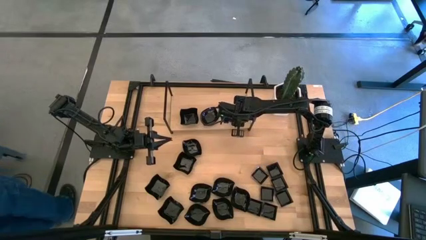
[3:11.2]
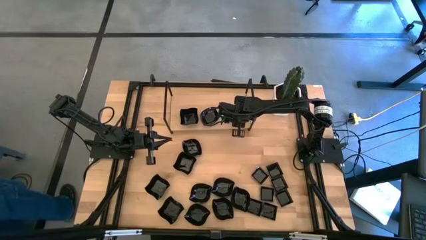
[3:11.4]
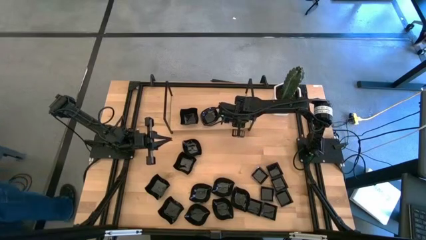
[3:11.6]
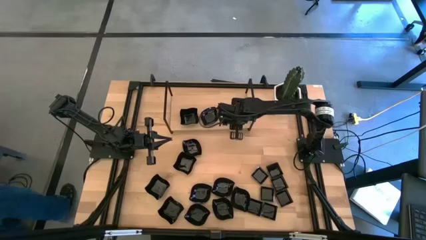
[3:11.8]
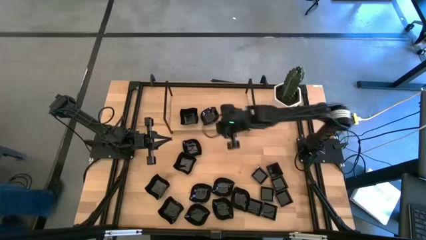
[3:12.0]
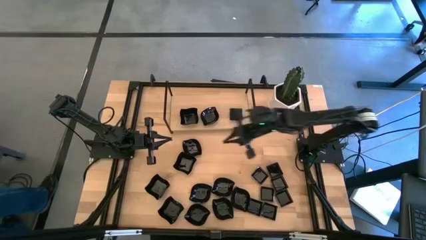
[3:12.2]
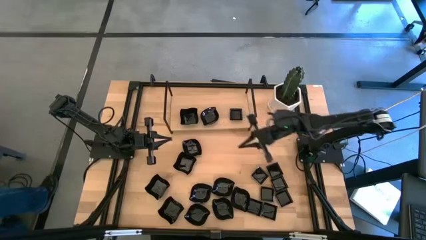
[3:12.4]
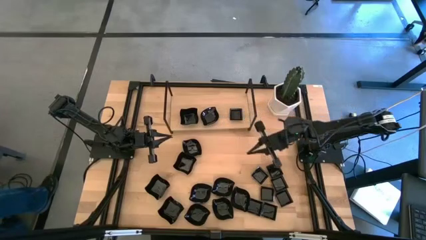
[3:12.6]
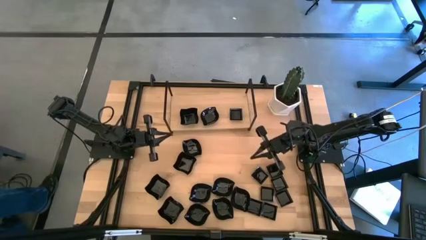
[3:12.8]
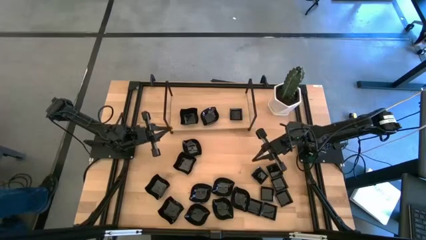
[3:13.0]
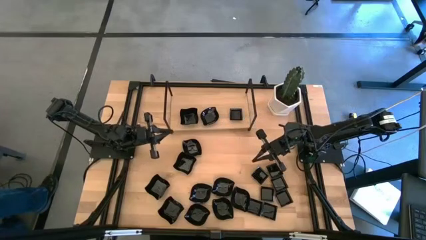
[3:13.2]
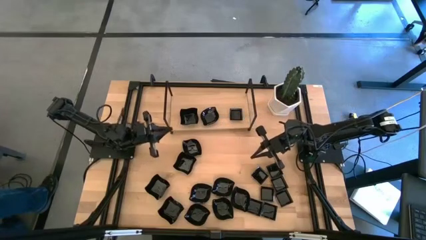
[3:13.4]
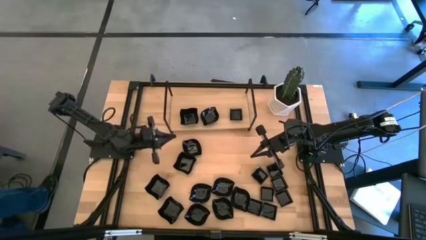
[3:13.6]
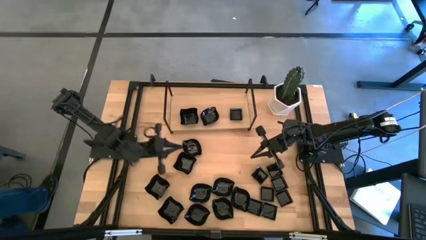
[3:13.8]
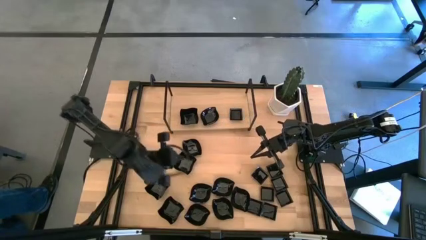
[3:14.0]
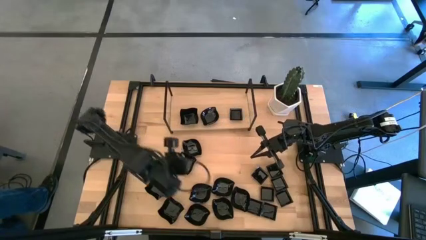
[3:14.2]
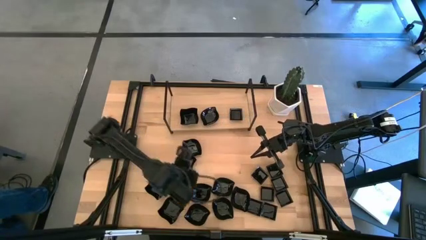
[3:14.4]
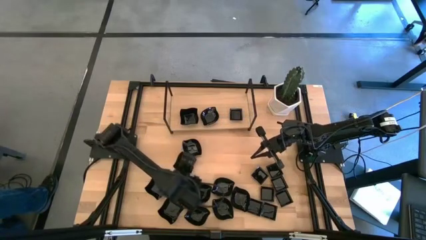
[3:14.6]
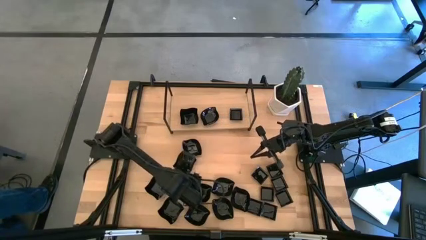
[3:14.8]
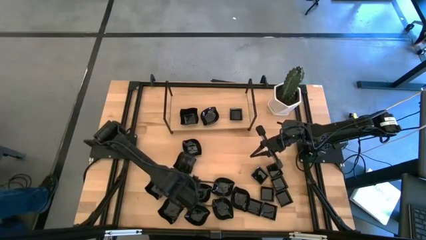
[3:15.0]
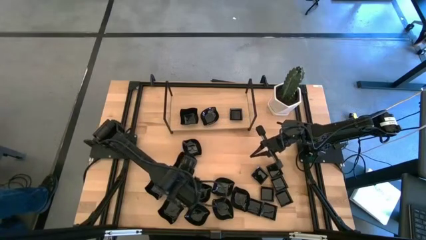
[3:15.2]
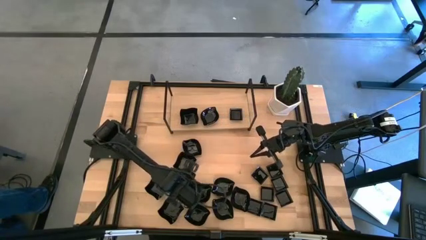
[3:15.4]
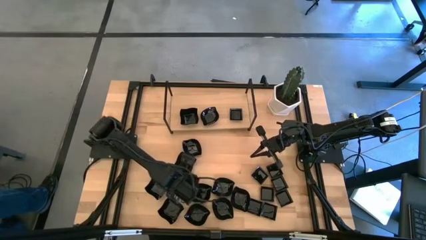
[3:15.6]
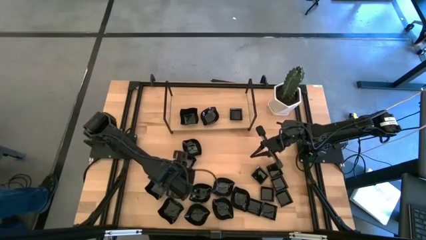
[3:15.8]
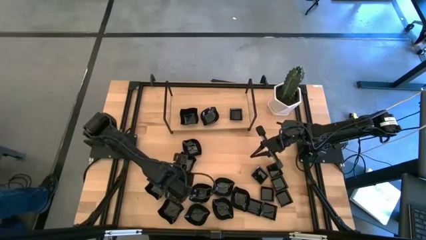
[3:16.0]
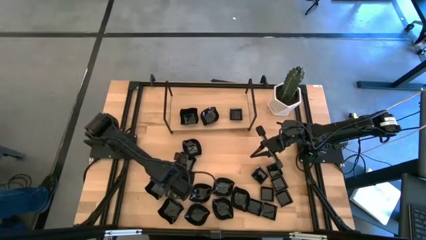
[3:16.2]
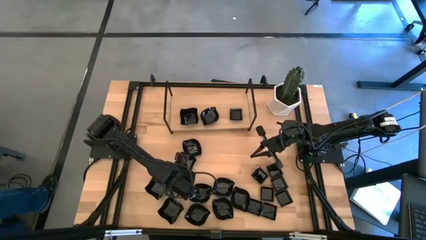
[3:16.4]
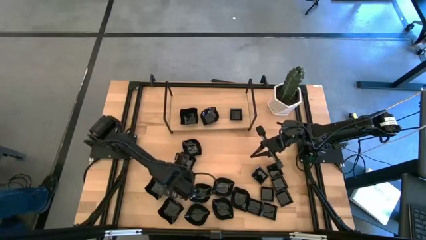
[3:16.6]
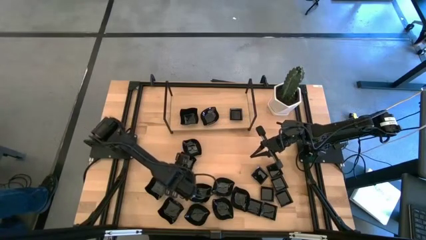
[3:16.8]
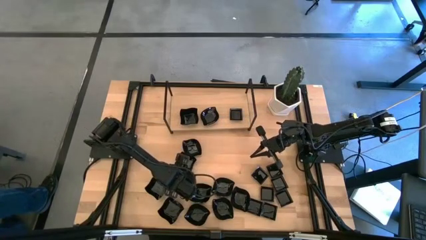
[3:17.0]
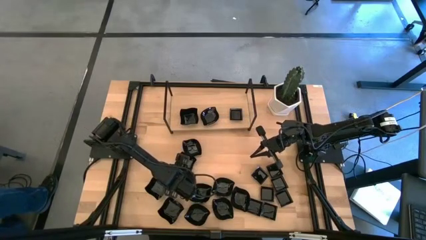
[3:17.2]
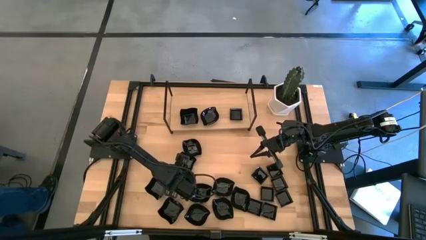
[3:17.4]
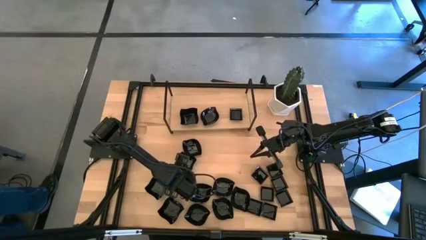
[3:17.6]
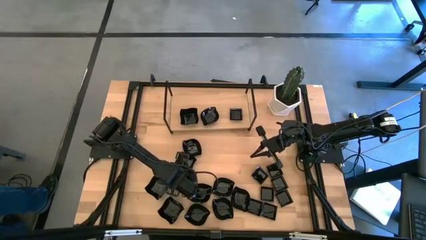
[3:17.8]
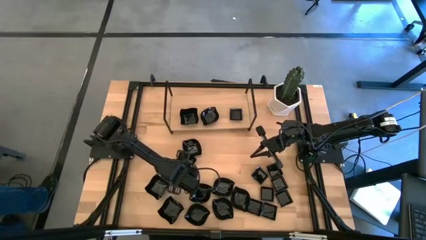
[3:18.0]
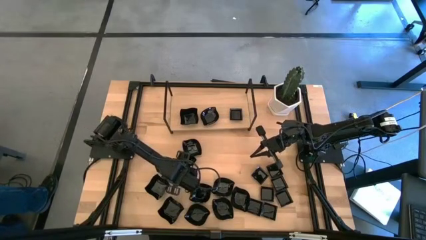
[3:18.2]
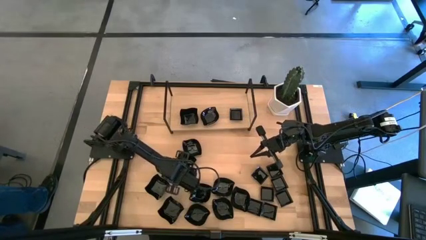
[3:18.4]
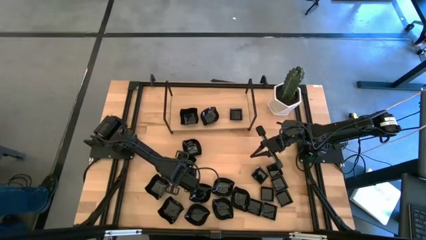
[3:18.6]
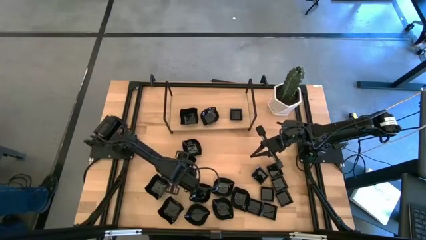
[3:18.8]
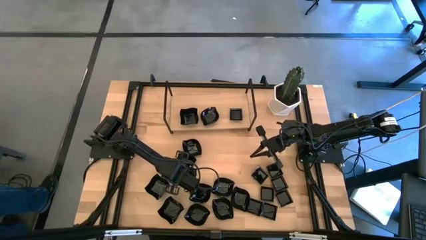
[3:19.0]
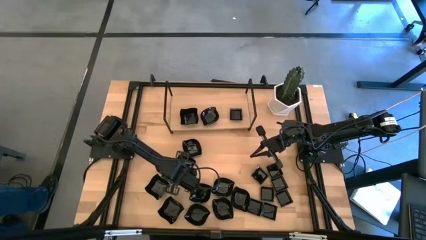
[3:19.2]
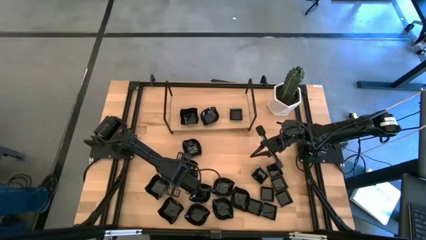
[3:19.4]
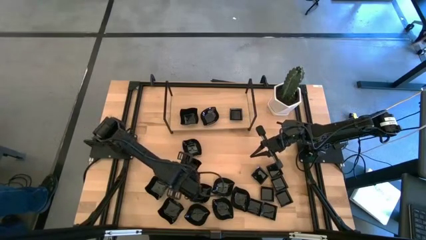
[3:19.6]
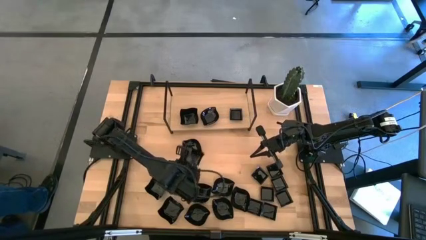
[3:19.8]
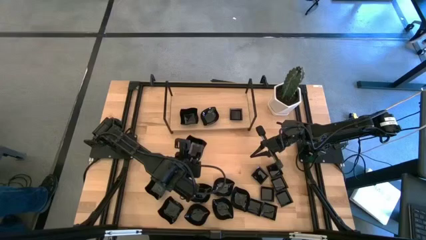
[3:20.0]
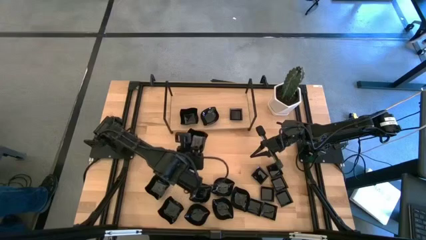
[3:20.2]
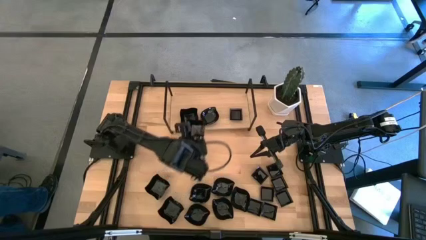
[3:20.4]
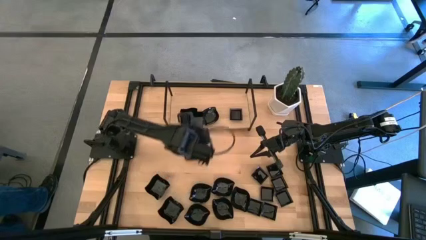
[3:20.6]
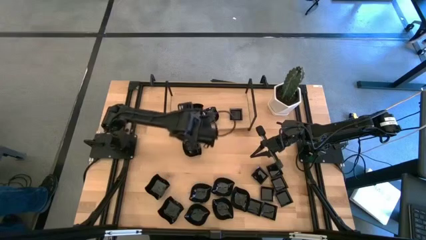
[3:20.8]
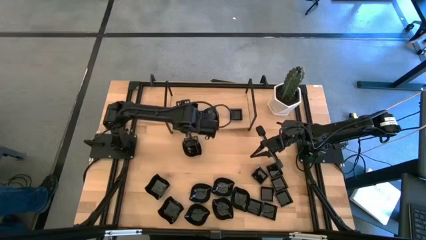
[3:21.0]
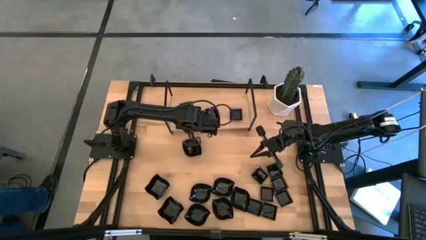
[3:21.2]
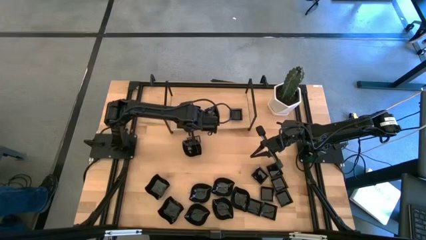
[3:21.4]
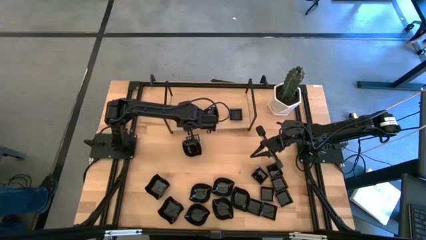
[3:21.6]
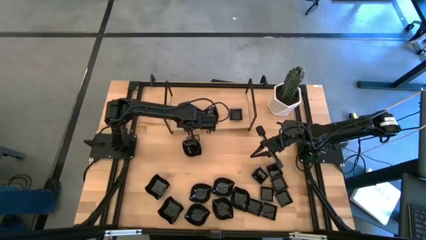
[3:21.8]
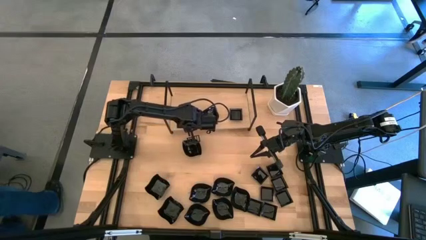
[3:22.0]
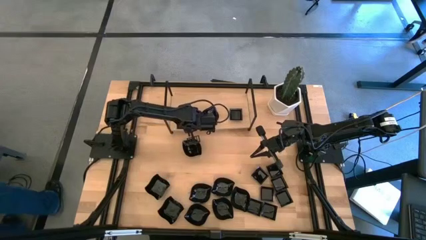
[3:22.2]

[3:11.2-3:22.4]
Task: Pick & Place Mini shaped plates
Stack the top distorted square plate on the top of the distorted square plate on the shelf

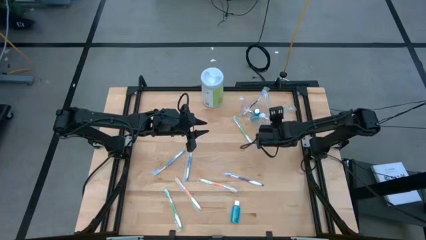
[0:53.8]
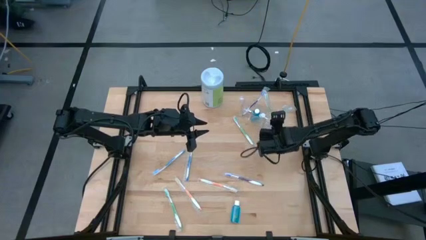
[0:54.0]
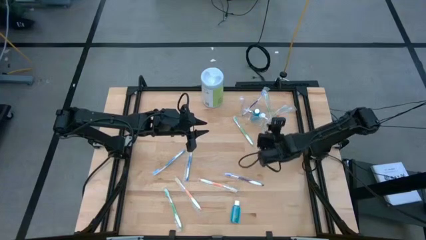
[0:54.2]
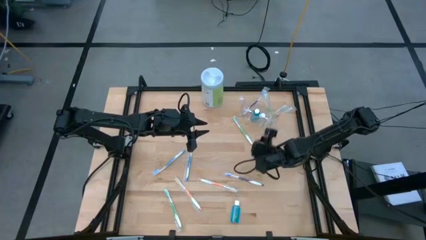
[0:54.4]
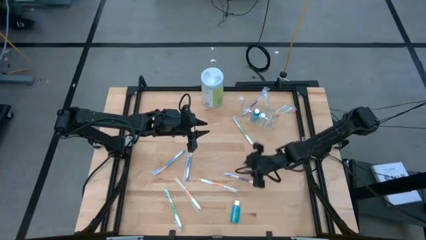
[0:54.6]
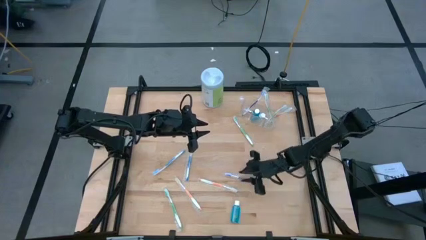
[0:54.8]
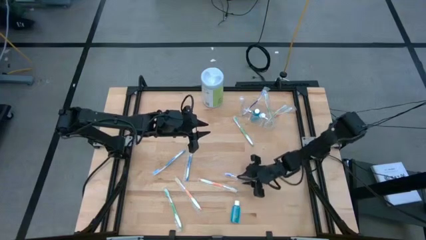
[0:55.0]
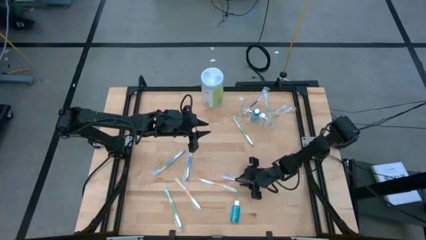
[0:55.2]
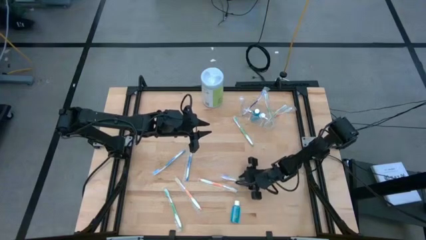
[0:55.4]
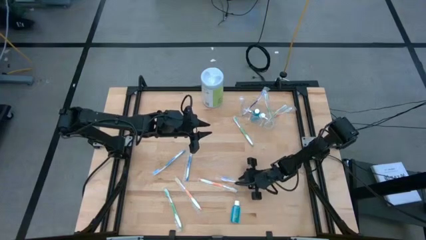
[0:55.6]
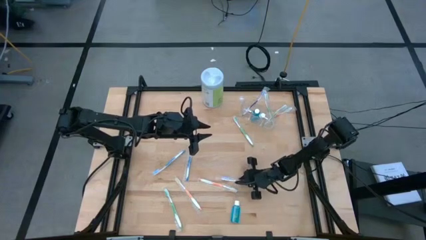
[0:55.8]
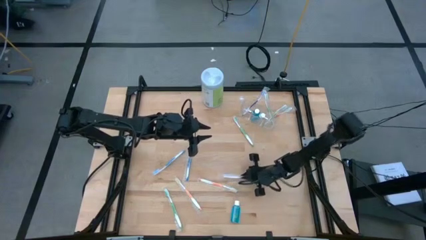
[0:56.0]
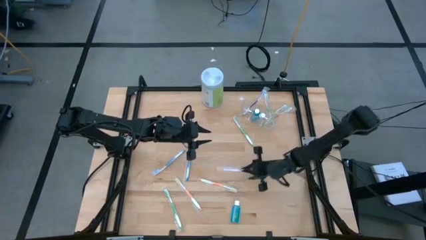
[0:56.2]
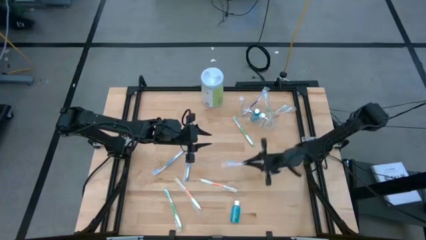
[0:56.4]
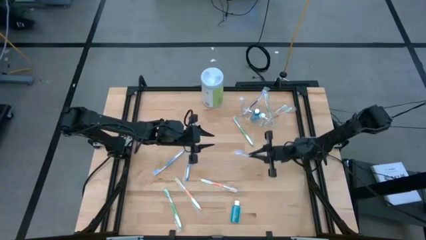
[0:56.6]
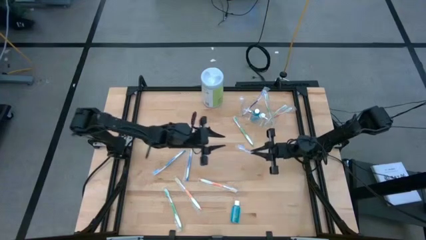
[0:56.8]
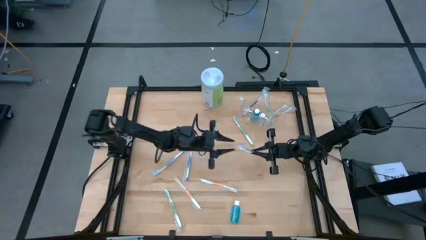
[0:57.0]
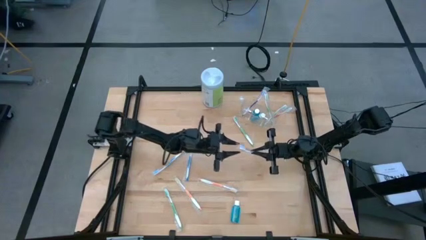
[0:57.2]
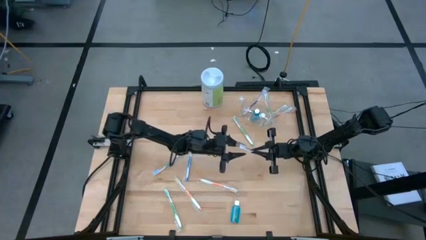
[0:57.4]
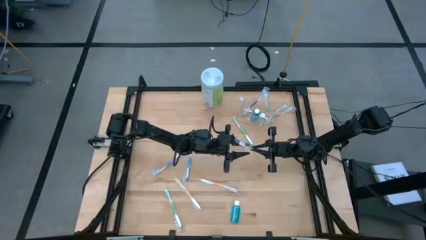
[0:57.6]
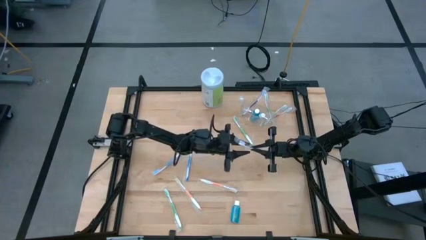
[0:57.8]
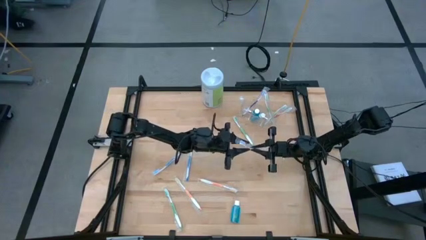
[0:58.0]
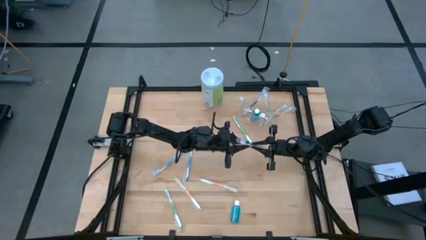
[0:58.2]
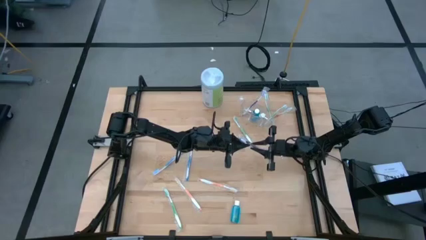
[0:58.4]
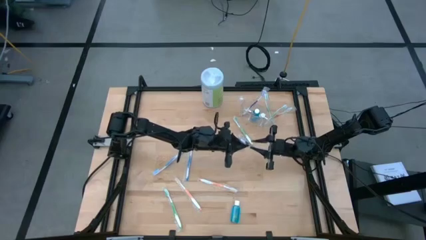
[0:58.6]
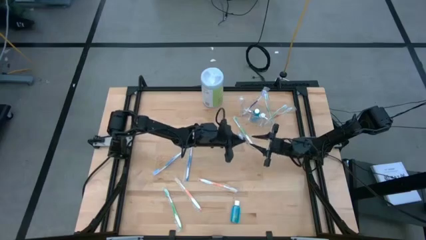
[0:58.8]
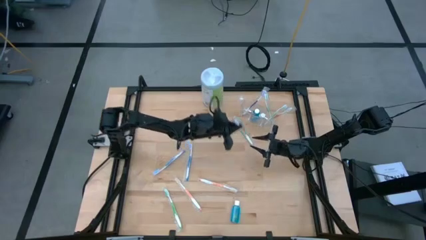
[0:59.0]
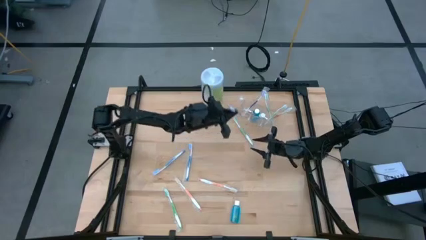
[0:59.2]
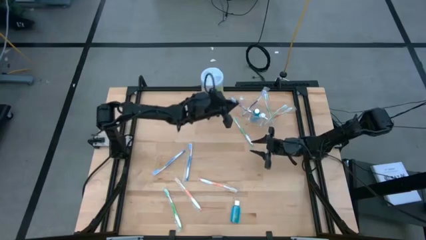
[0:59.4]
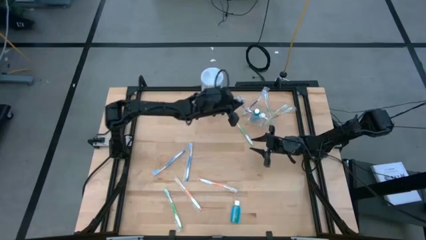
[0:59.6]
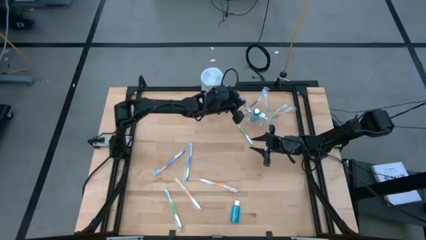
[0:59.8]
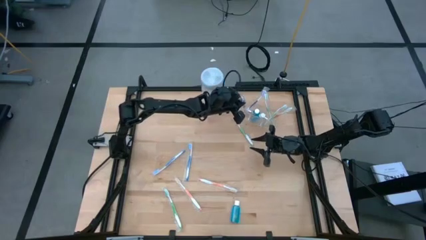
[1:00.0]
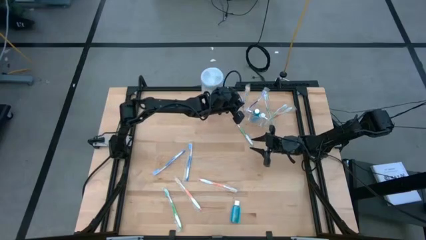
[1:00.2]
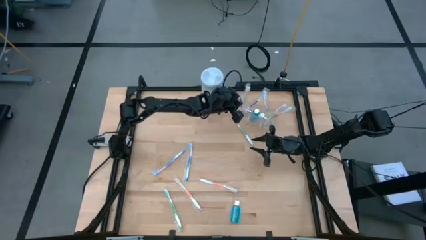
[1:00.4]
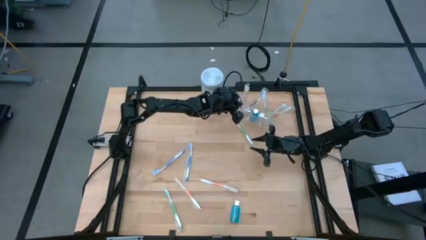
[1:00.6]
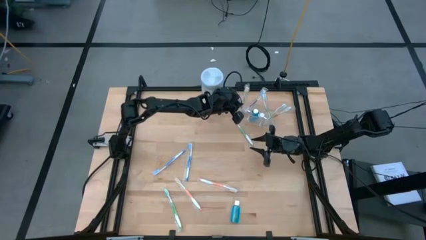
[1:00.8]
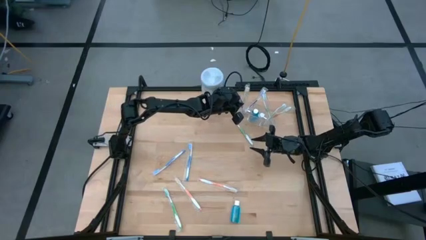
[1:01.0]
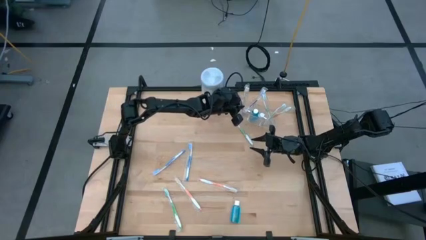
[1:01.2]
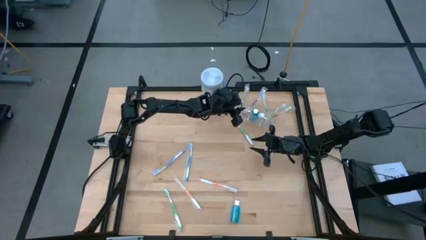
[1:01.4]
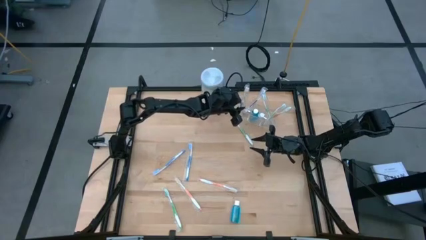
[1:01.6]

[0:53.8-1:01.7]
Task: Pick & Place toothbrushing station
Put the purple toothbrush into the transparent organizer
